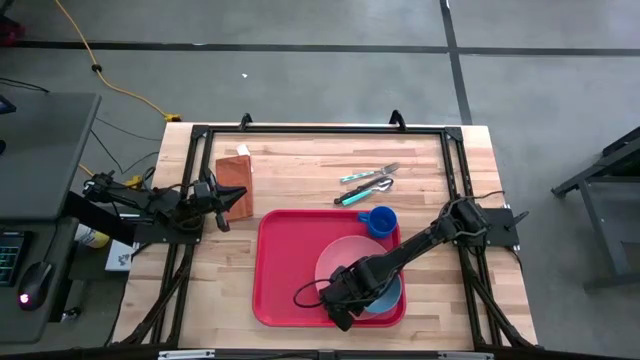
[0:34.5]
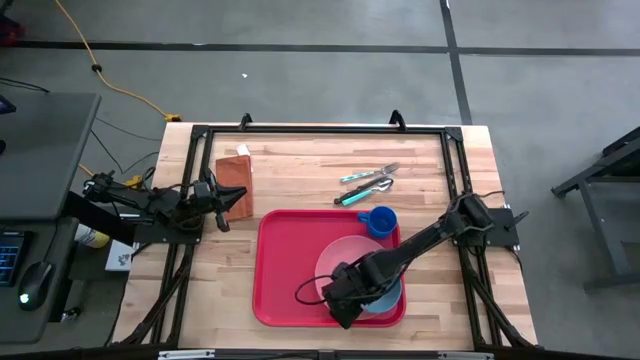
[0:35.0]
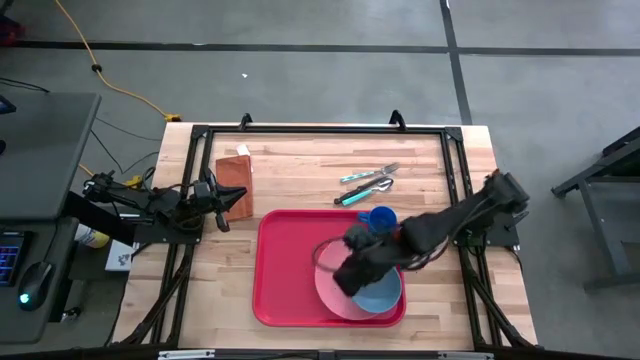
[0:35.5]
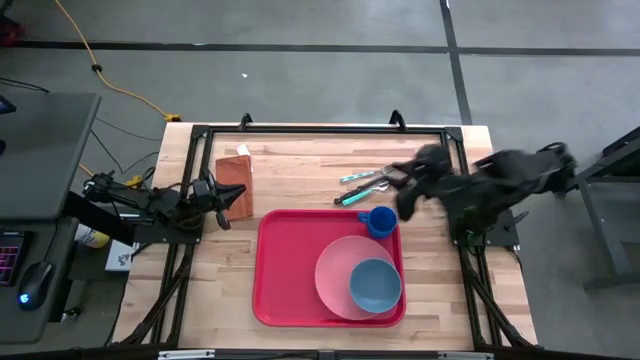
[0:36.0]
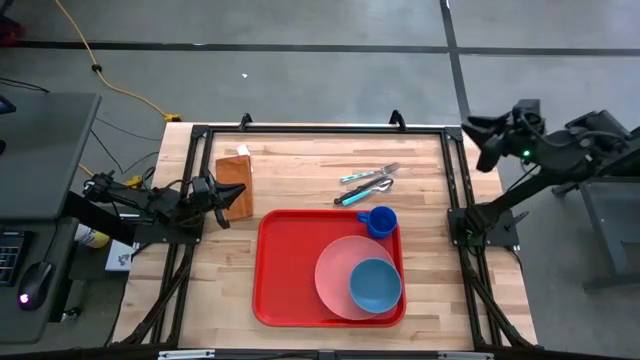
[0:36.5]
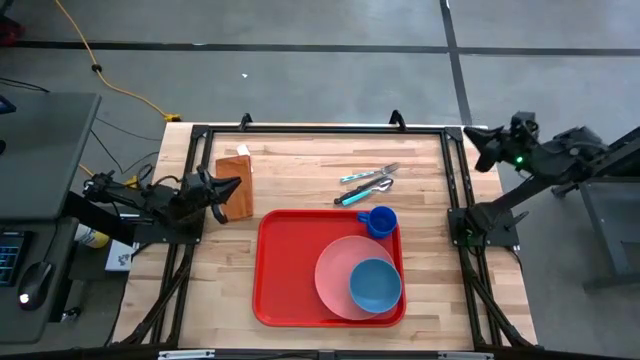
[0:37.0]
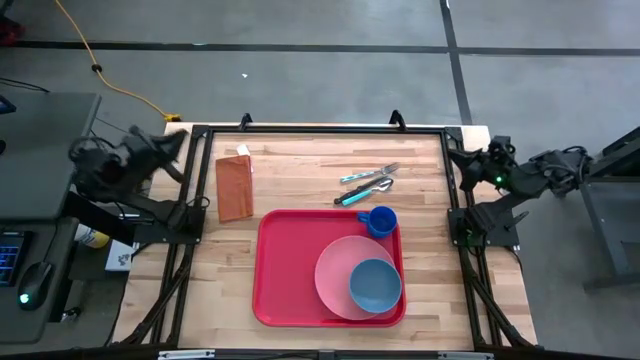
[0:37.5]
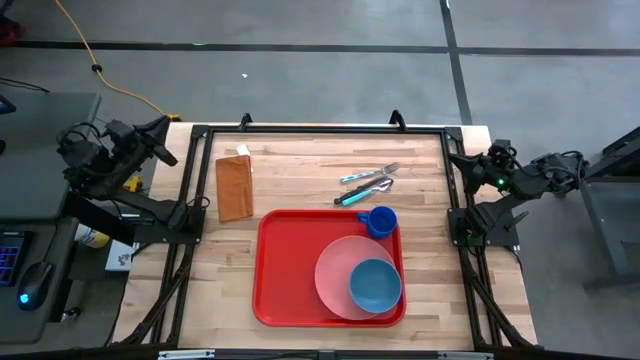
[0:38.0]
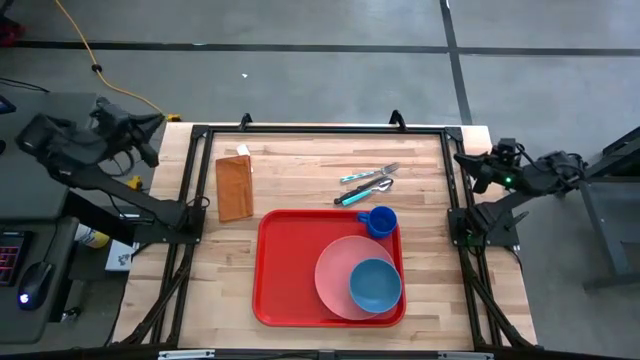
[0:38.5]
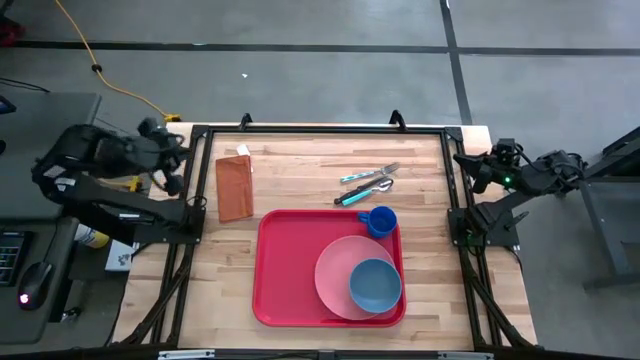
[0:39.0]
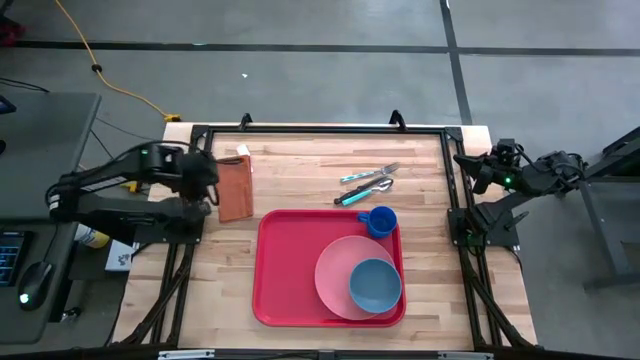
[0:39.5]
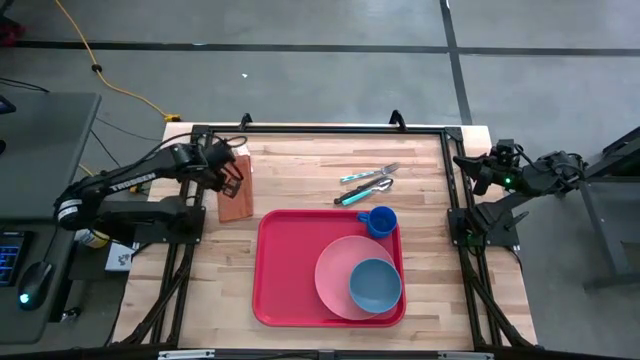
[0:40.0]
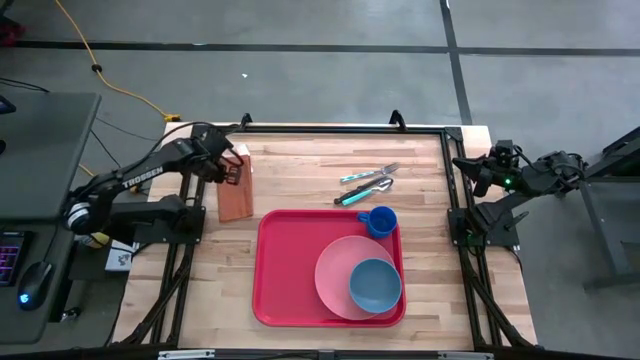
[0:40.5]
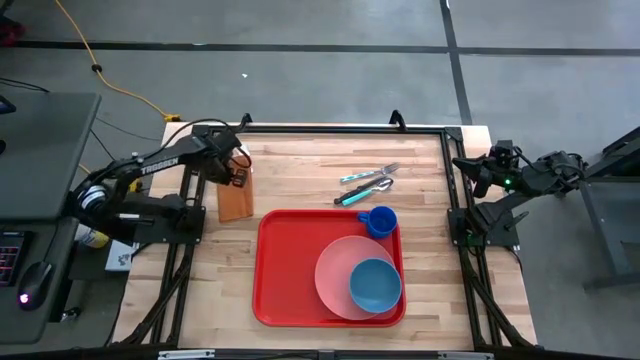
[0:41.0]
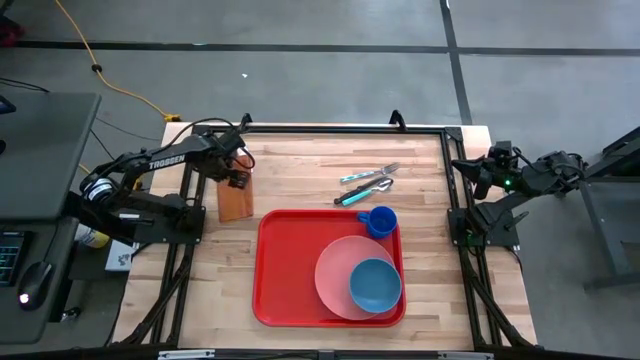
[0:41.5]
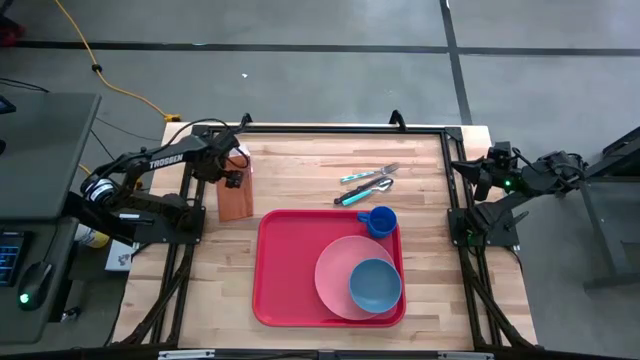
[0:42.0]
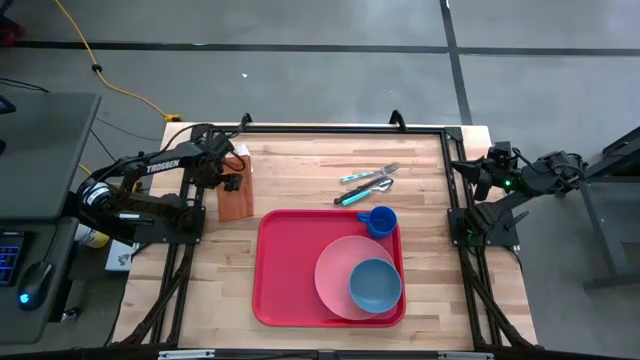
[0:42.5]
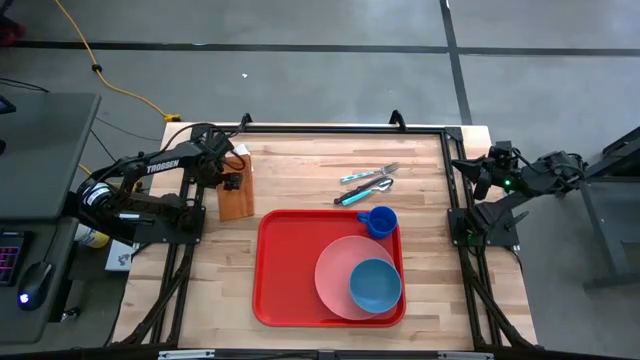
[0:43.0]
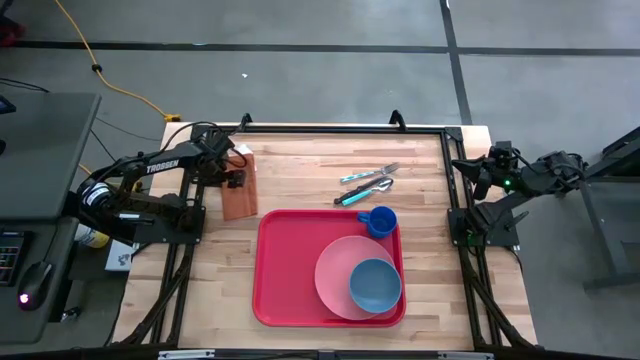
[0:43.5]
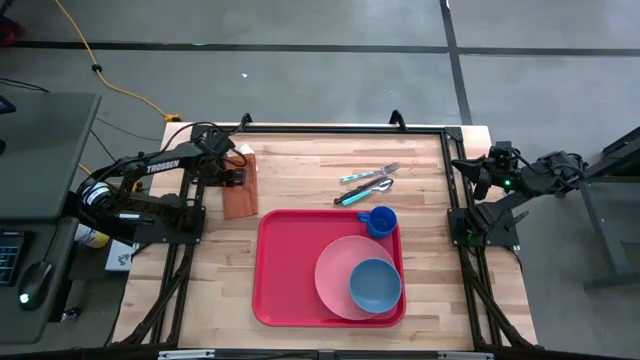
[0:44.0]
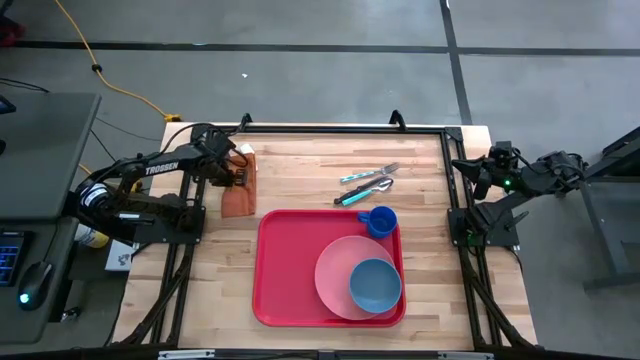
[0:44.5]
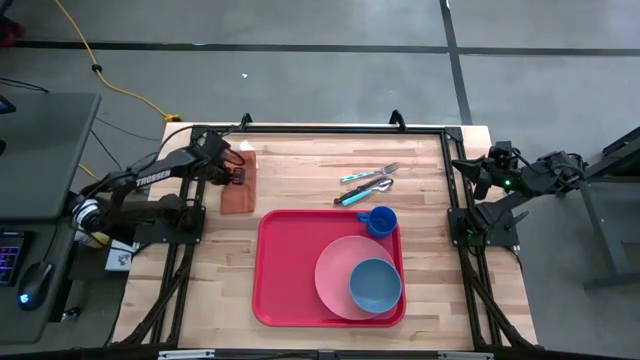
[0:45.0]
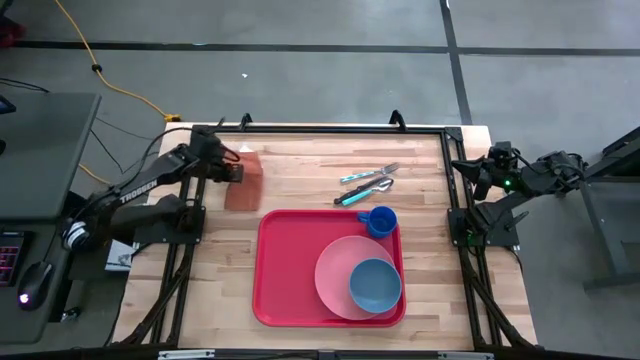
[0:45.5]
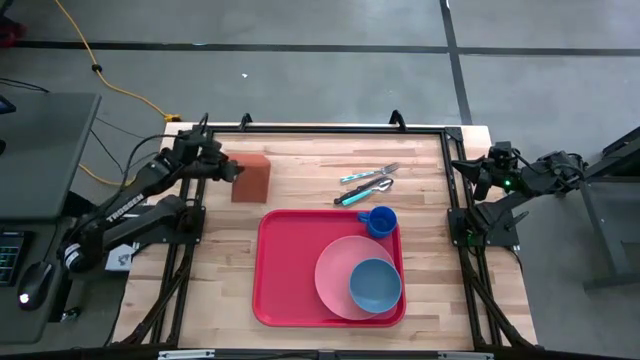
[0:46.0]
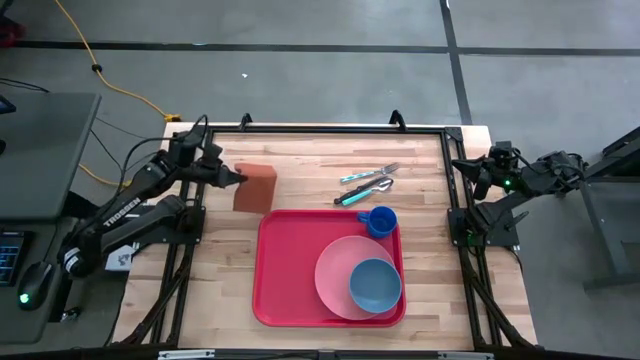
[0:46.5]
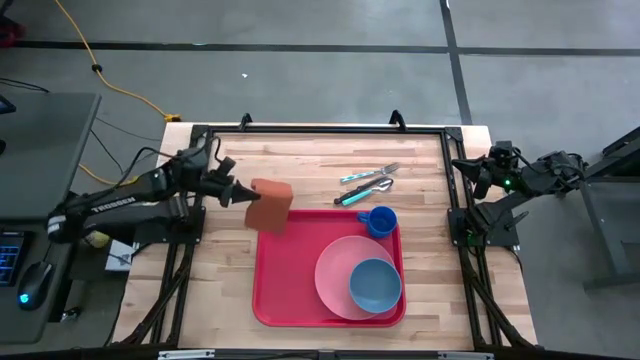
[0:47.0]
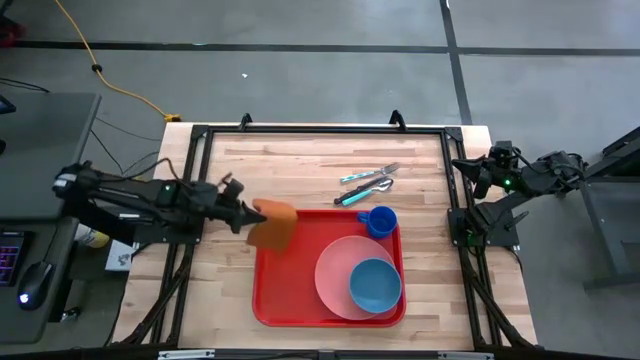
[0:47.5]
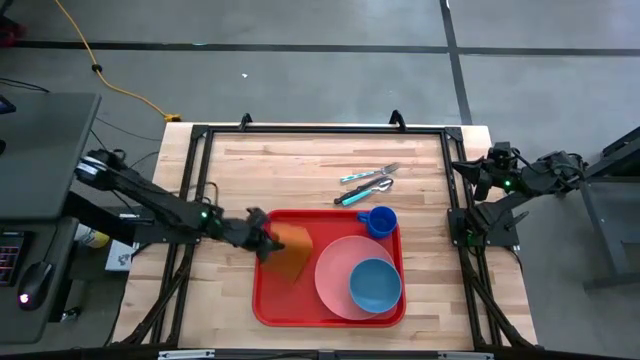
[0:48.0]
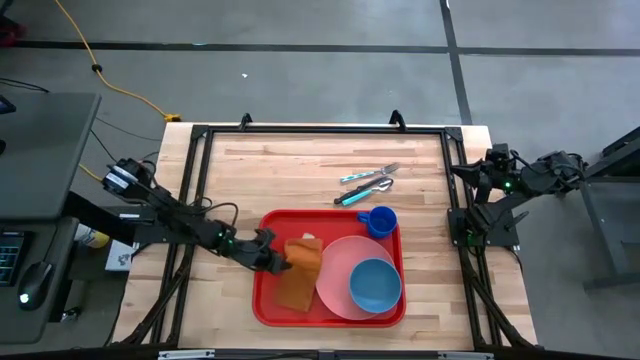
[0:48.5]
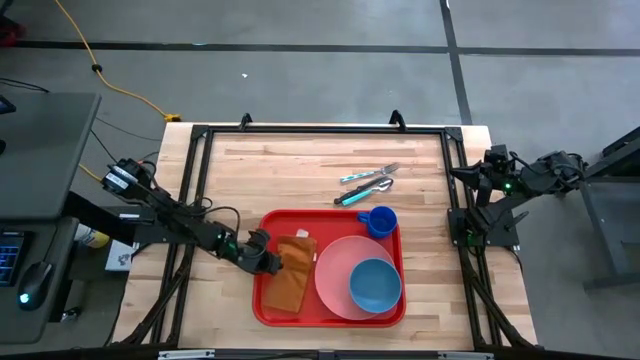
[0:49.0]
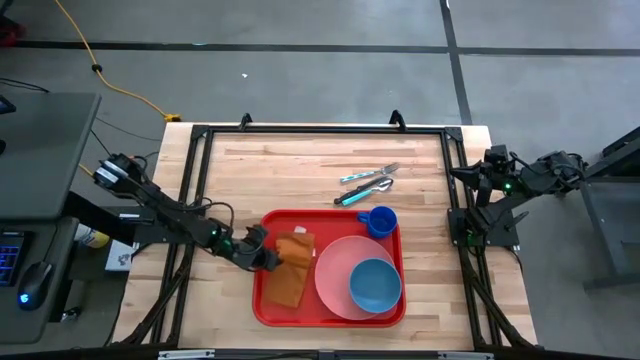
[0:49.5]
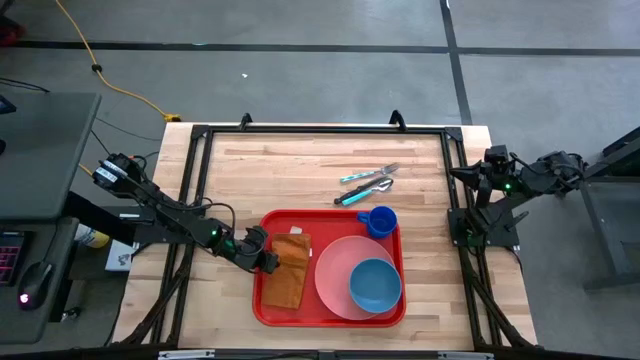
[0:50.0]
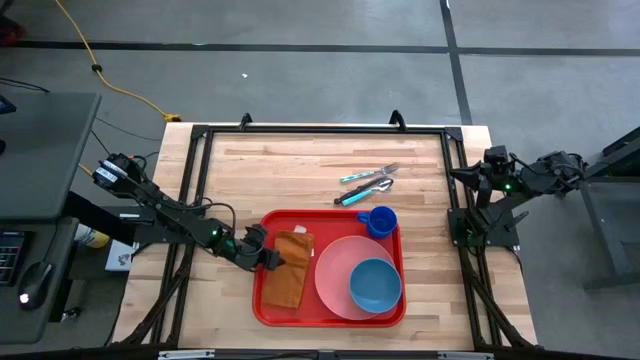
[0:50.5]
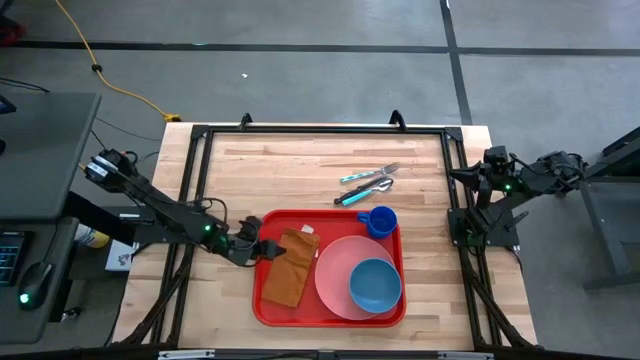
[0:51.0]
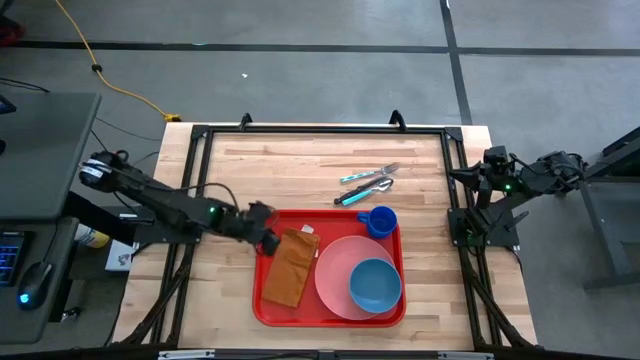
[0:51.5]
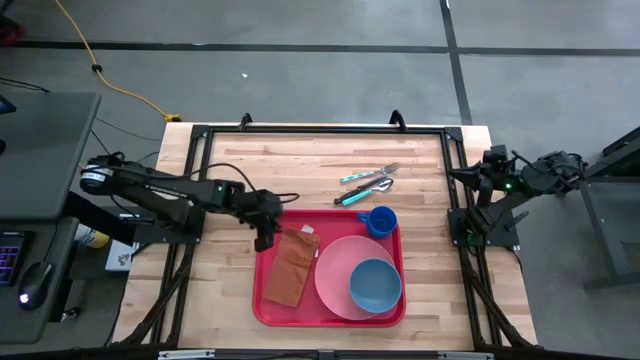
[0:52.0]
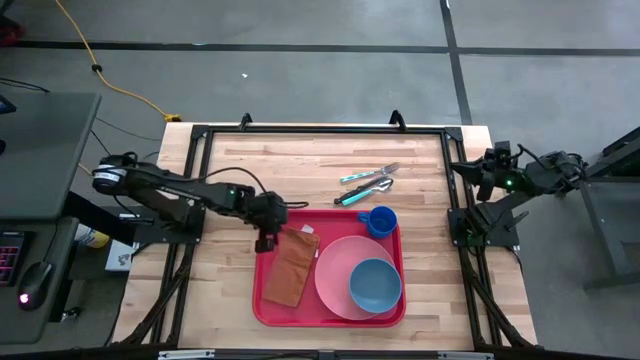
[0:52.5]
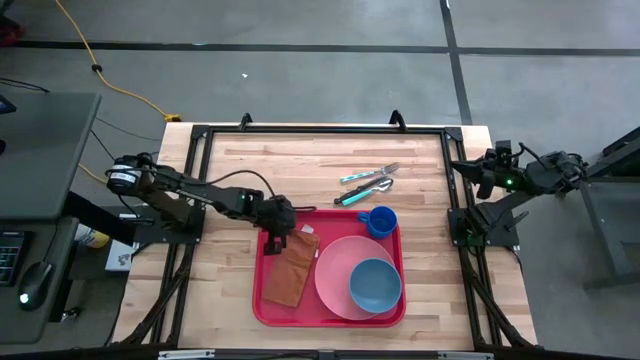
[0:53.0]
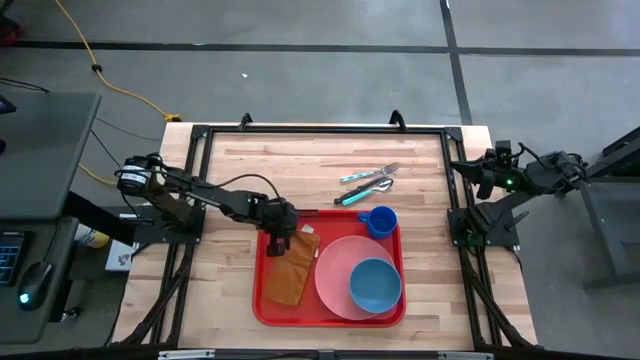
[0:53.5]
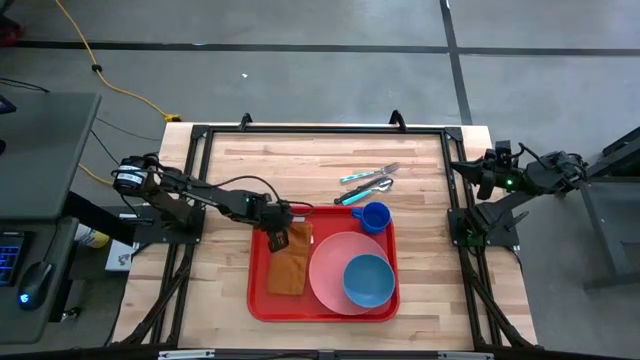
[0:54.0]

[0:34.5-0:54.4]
Task: Set up tray
Put the orange napkin on the red serving tray

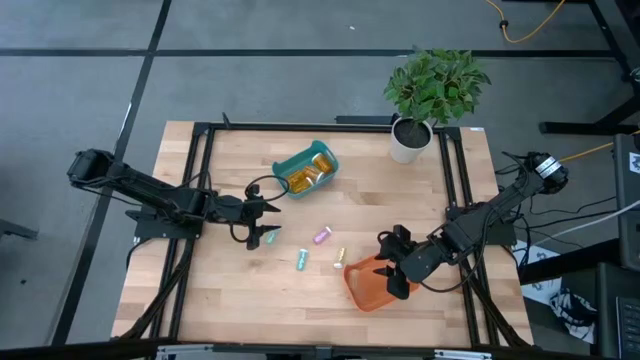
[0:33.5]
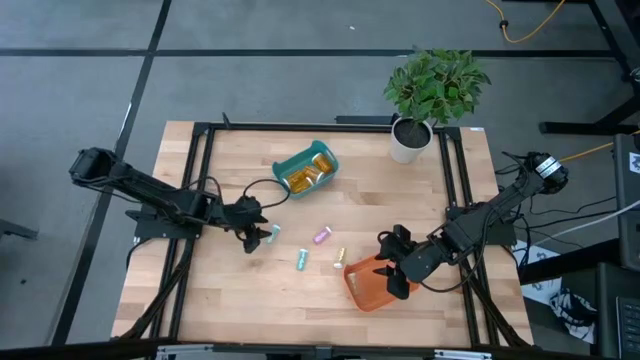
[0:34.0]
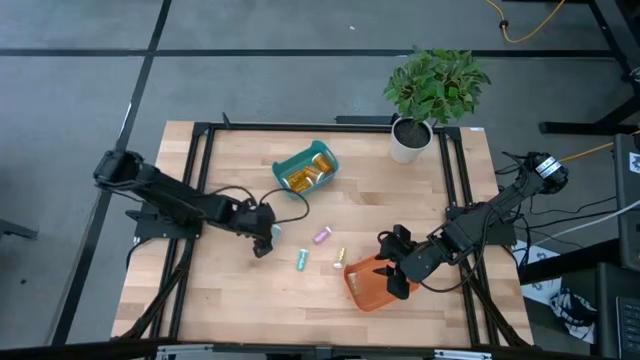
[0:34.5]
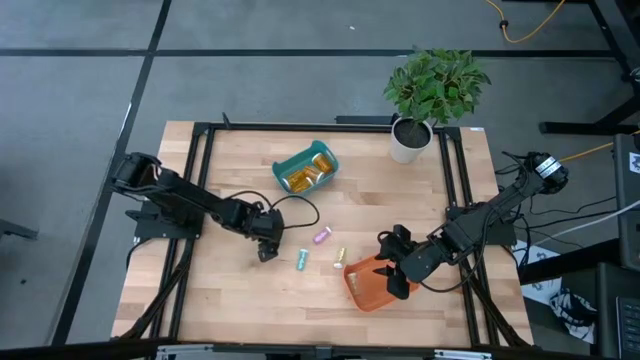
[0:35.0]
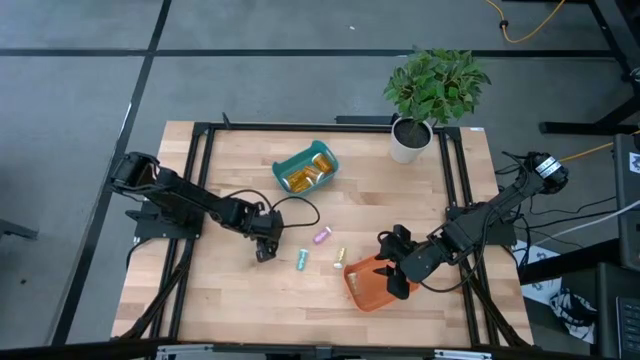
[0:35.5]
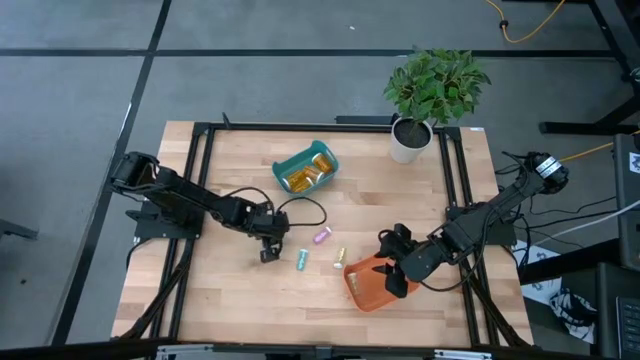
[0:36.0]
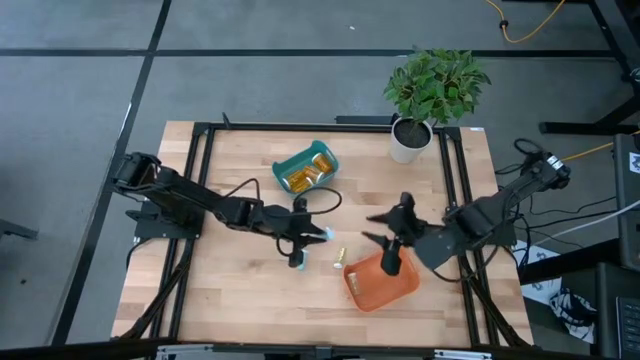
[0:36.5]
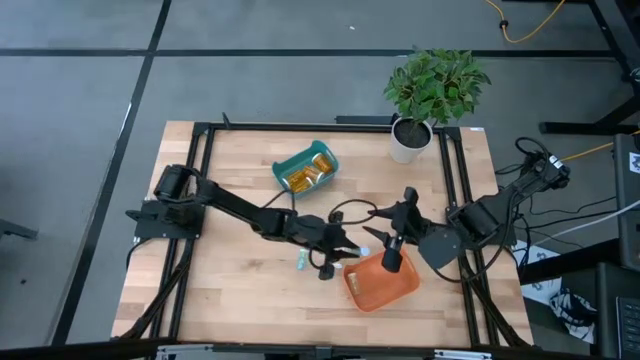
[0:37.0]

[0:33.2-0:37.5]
Task: Pick and place medicine bottles into bin by pill shape (circle, oval)
Put the left small light blue pill bottle into the orange bin
